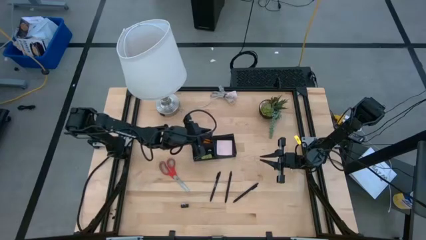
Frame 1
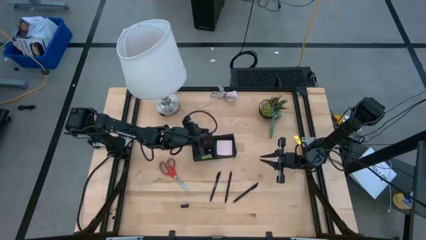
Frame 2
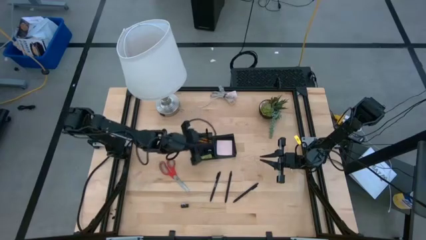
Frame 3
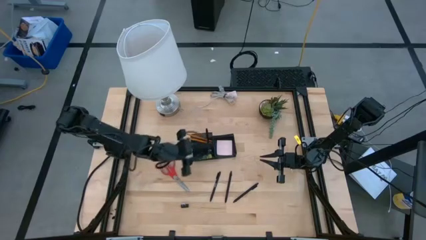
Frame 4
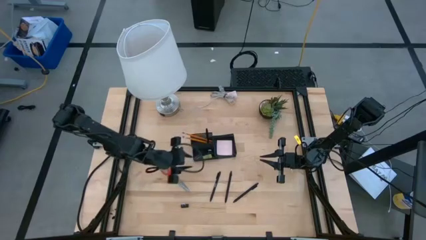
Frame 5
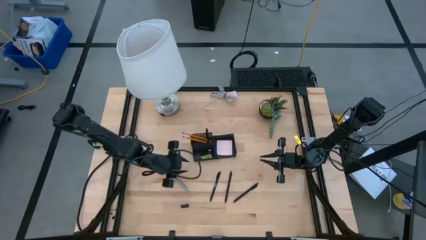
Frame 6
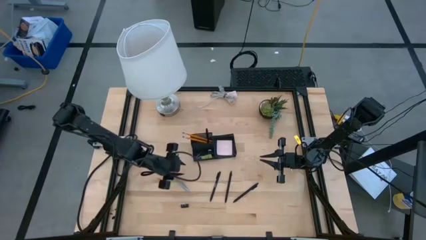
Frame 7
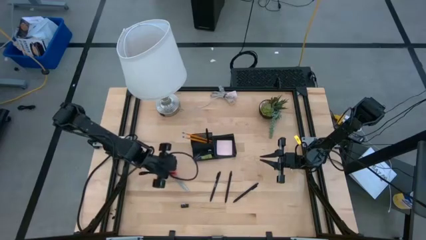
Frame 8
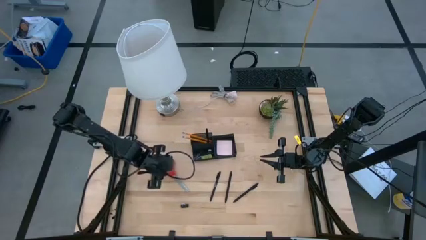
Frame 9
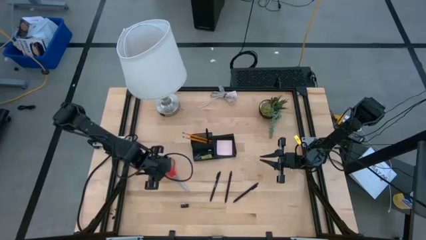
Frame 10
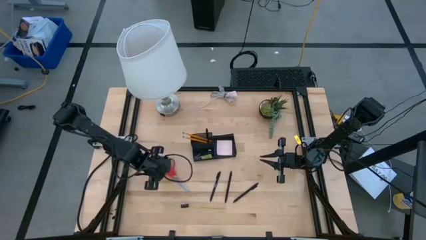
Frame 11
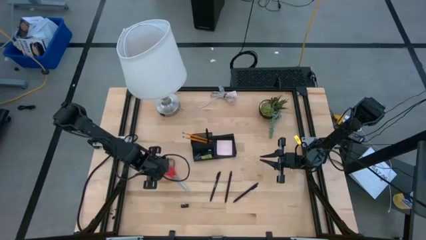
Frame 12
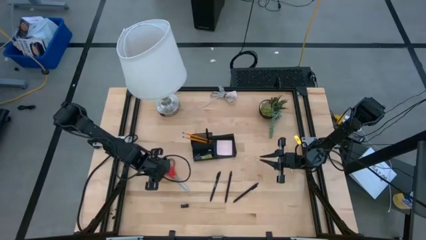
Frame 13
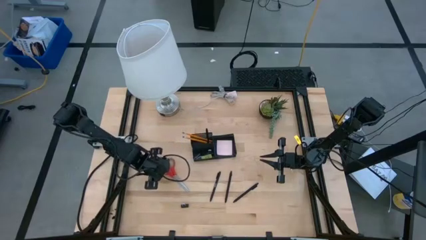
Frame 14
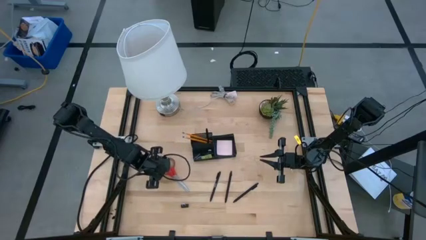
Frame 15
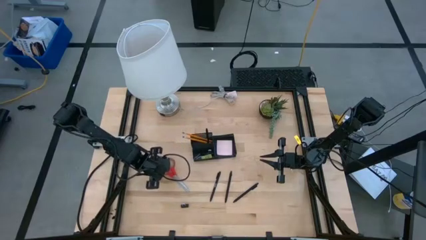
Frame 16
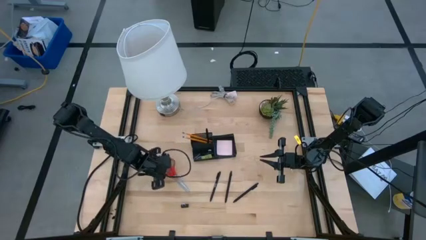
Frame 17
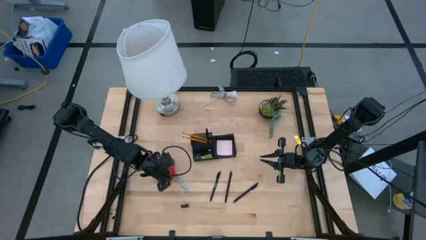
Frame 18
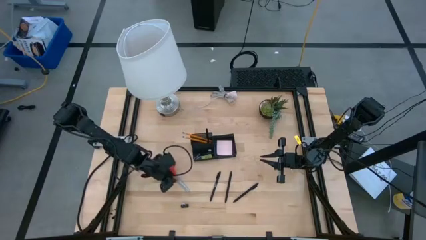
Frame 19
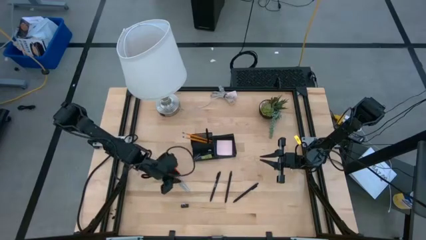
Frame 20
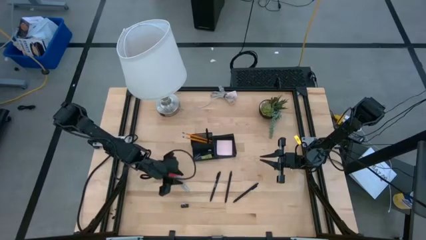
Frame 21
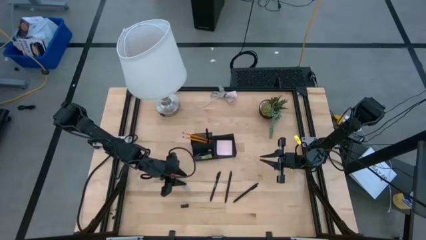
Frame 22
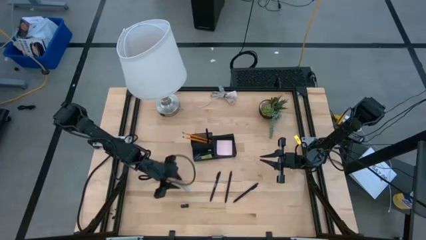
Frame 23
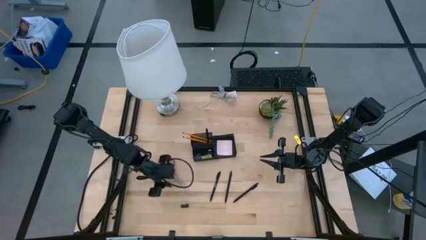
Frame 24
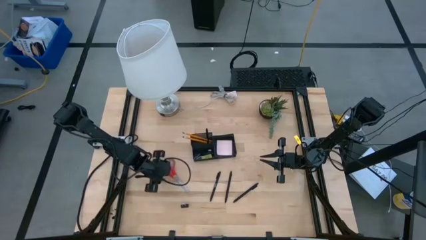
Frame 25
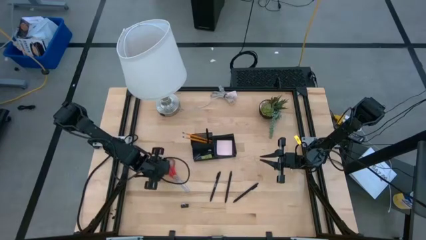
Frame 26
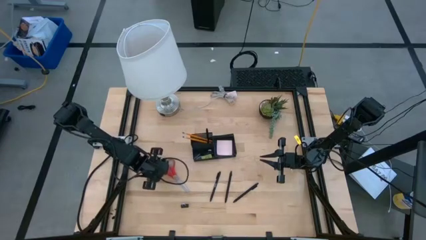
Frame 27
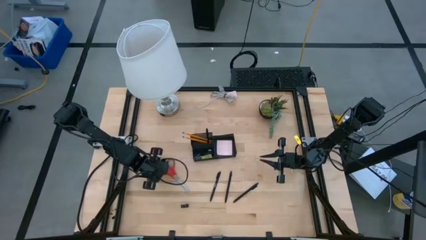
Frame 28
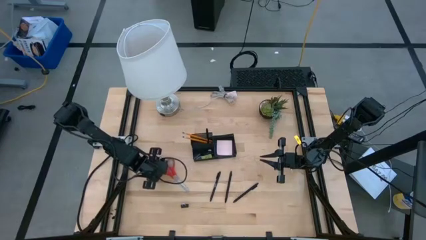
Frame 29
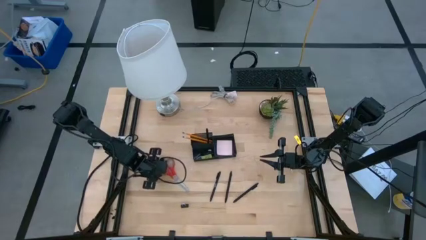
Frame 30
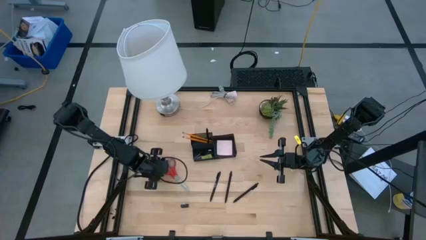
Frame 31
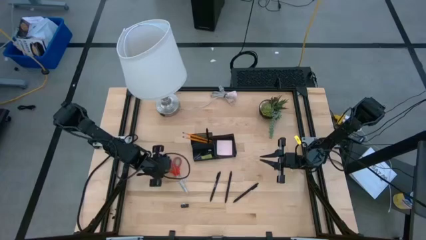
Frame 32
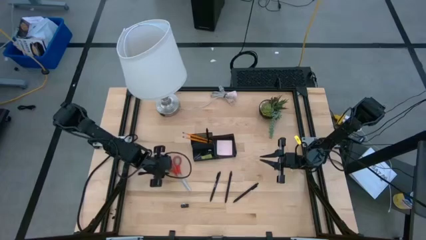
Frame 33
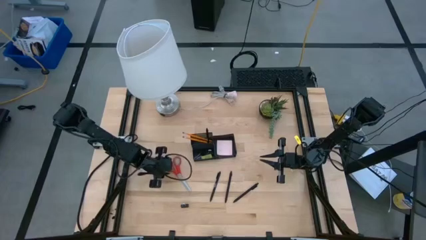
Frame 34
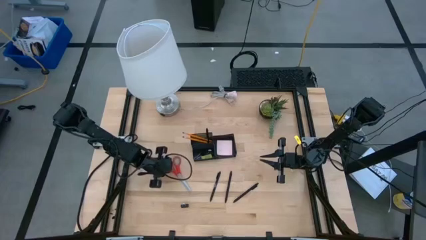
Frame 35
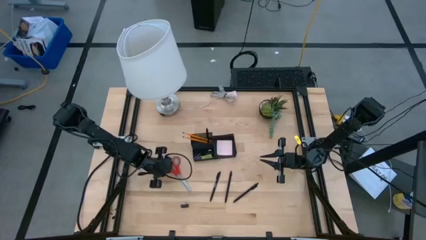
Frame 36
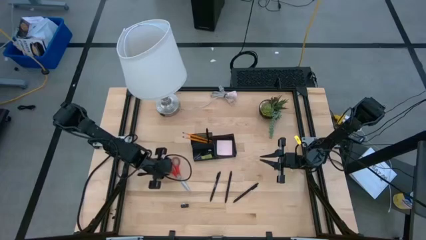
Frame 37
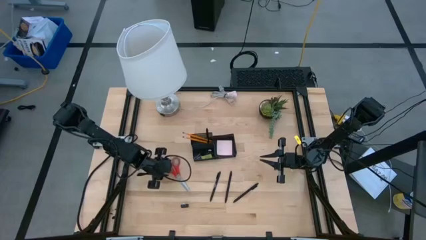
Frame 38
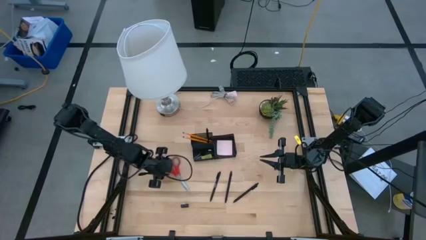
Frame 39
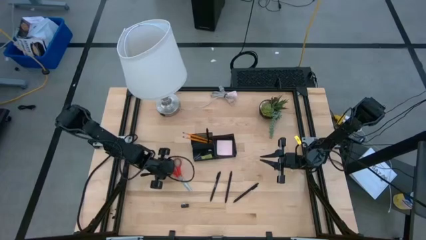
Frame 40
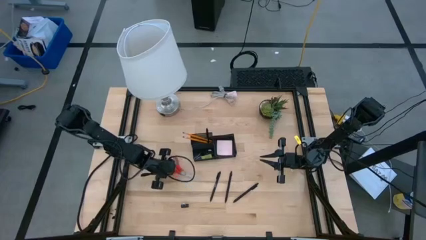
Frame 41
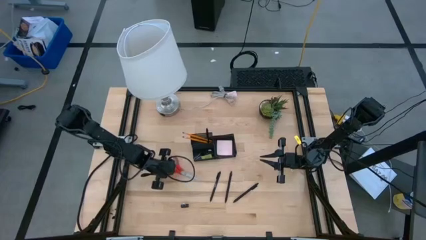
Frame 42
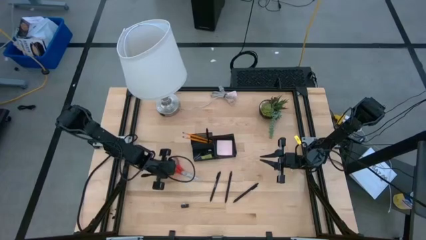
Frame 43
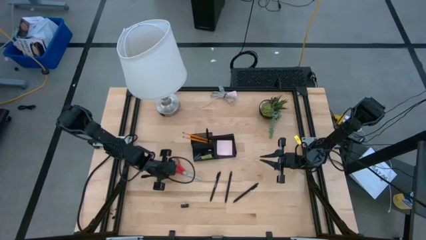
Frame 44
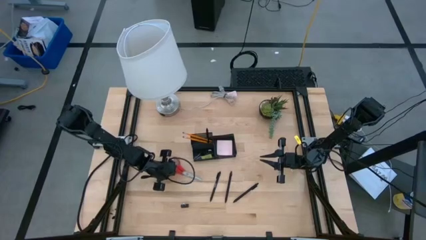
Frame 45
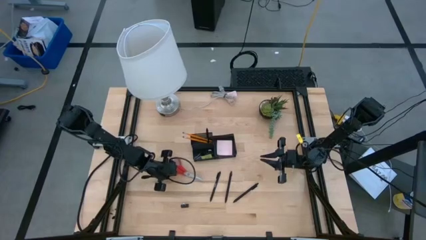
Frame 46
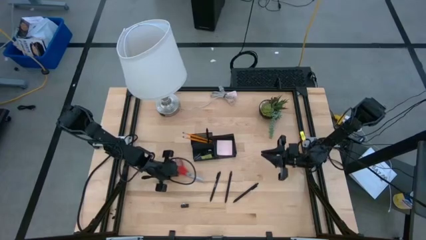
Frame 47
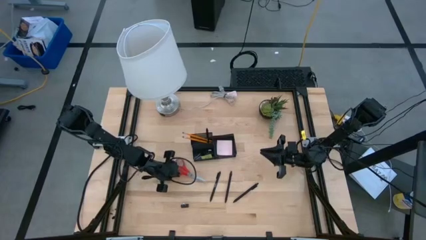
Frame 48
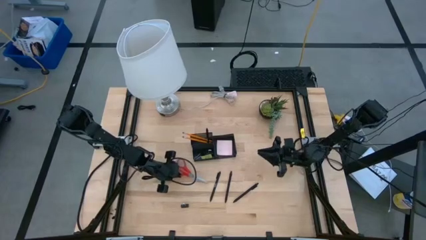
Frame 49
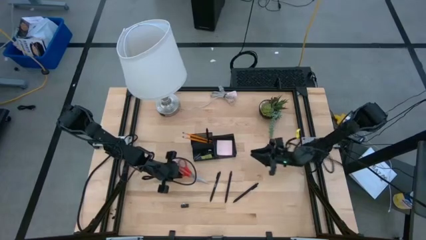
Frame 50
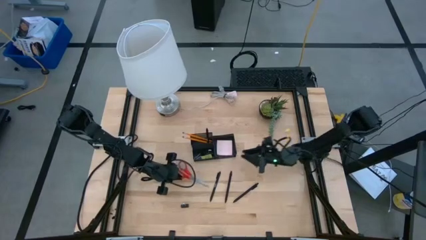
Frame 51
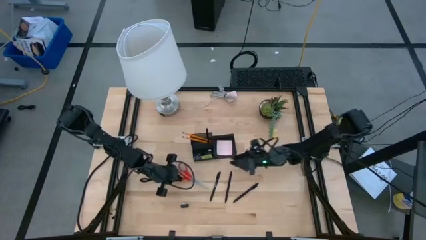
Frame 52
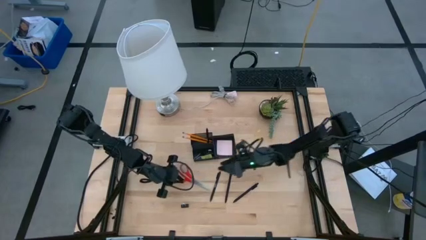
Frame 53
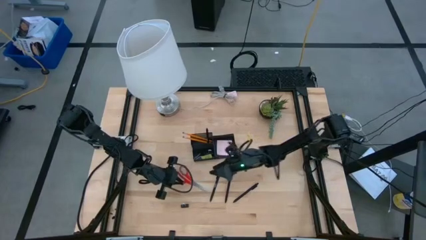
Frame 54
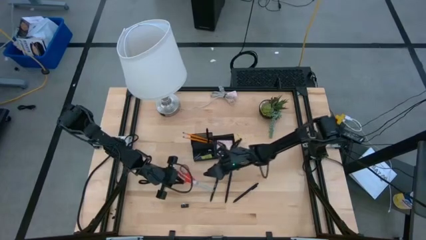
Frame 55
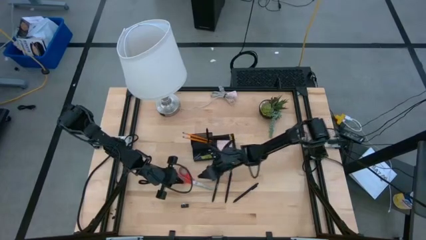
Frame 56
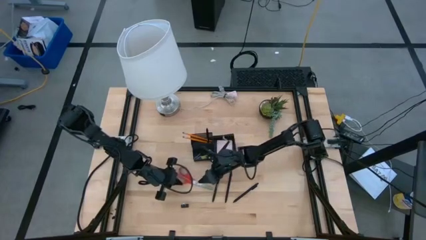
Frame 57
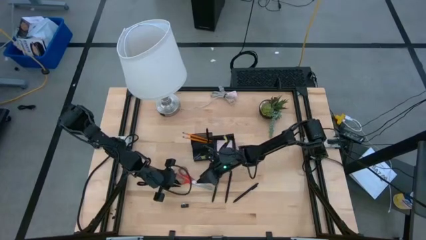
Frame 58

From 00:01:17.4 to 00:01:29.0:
Task: Pick and place office supplies into organizer
Put the red scissors into the black desk organizer
